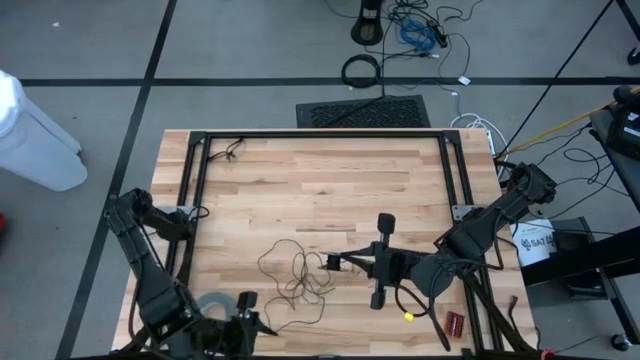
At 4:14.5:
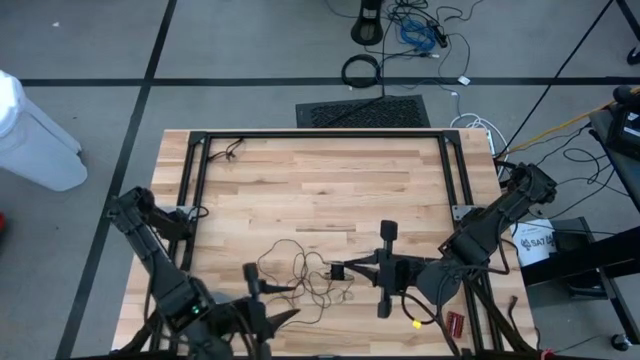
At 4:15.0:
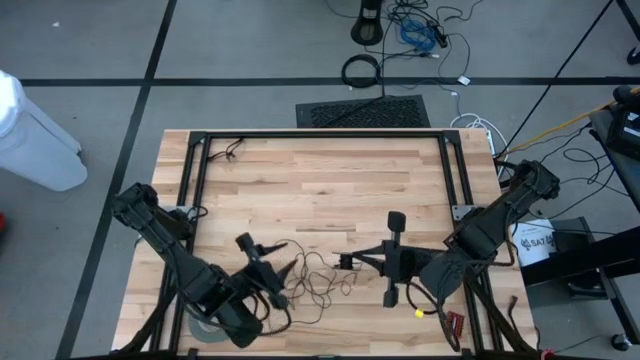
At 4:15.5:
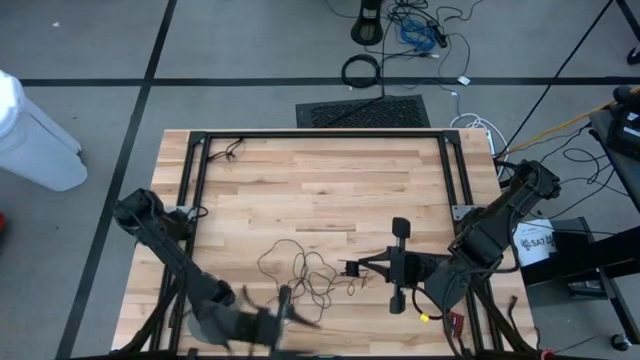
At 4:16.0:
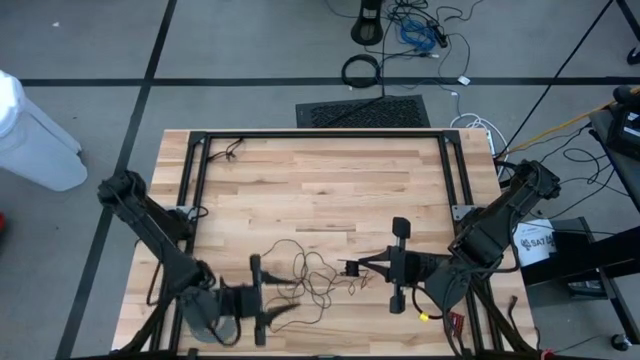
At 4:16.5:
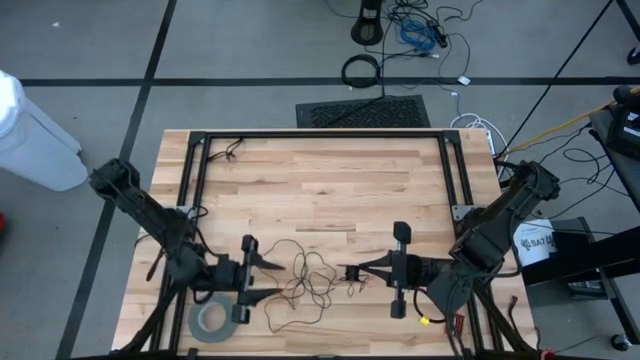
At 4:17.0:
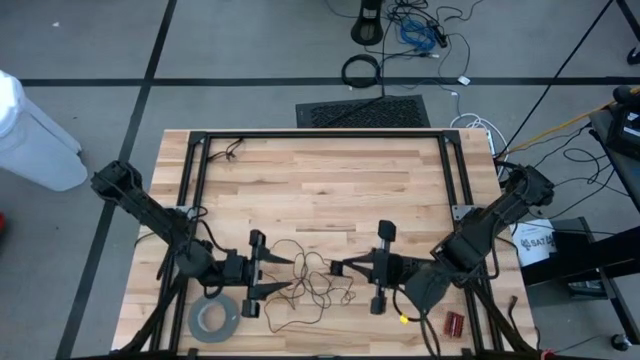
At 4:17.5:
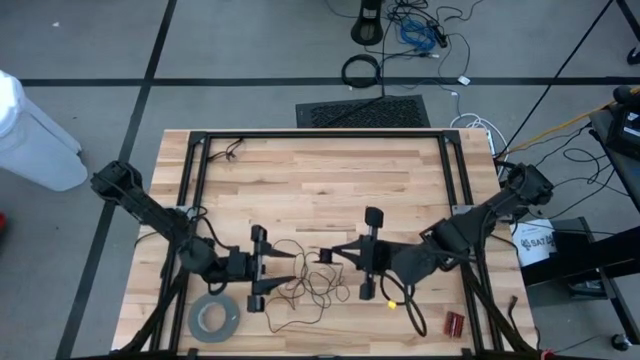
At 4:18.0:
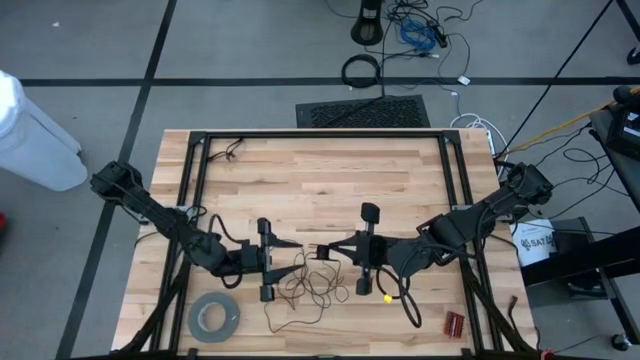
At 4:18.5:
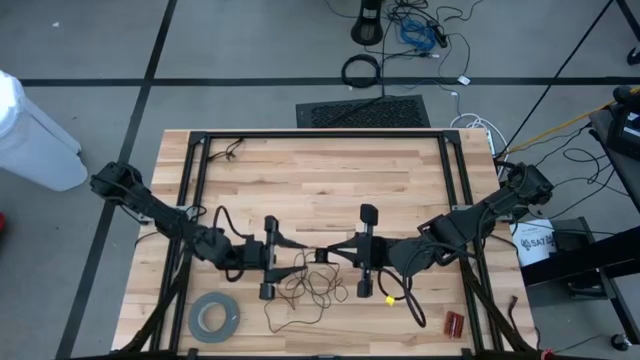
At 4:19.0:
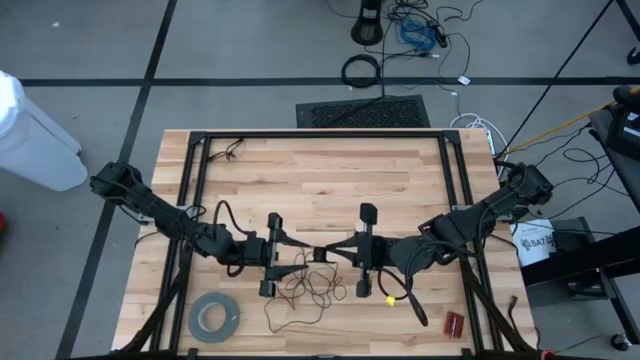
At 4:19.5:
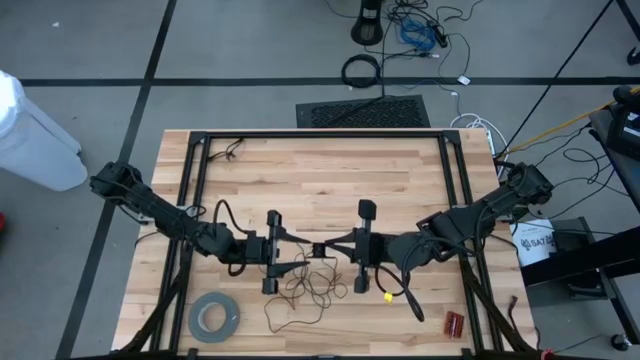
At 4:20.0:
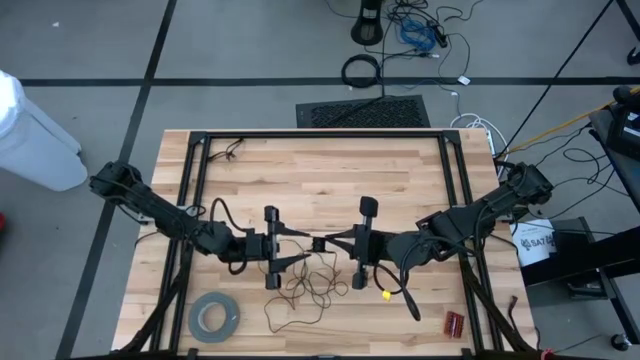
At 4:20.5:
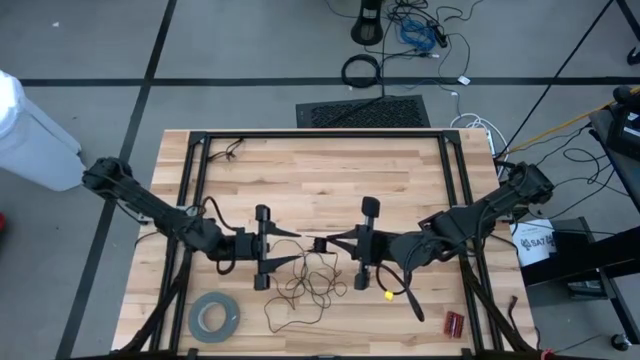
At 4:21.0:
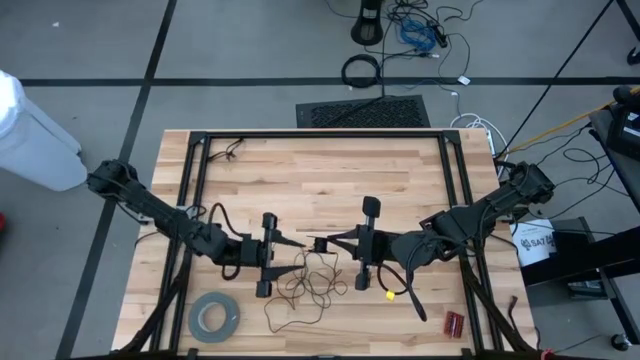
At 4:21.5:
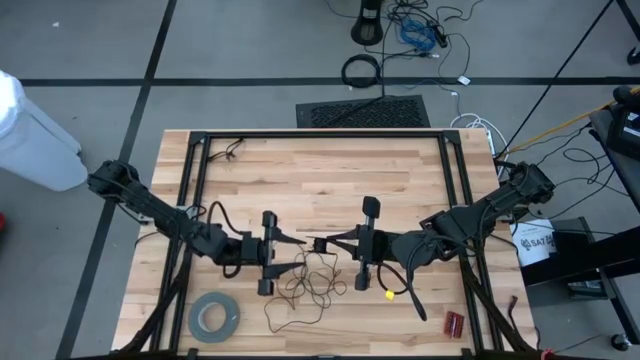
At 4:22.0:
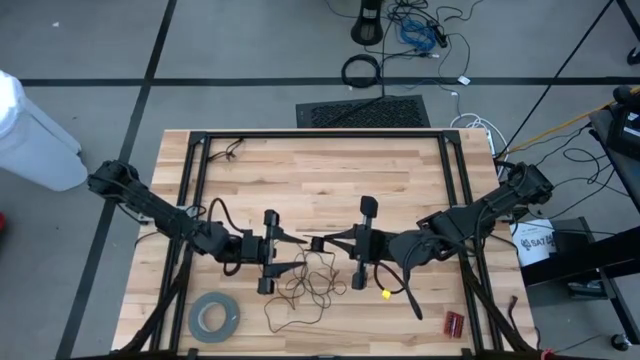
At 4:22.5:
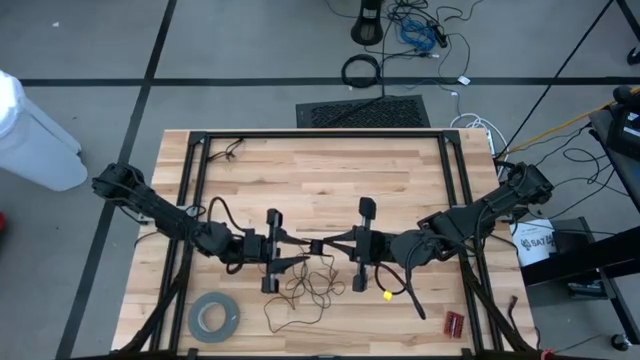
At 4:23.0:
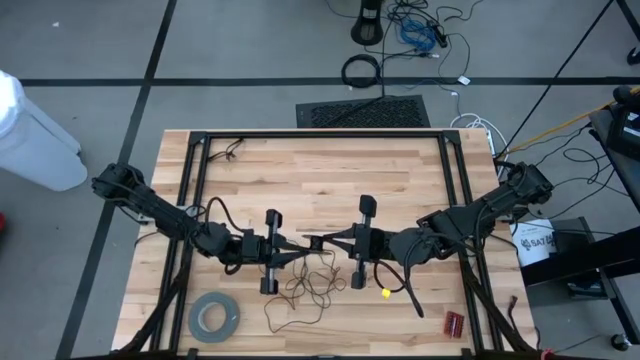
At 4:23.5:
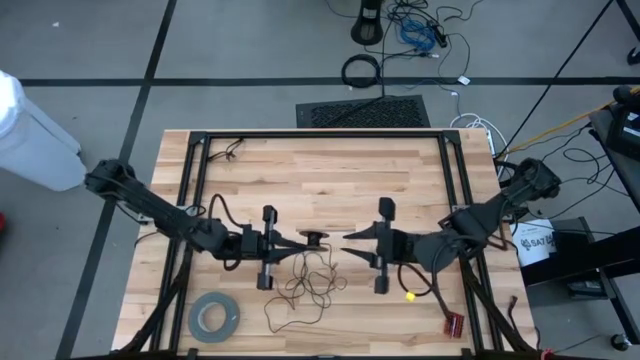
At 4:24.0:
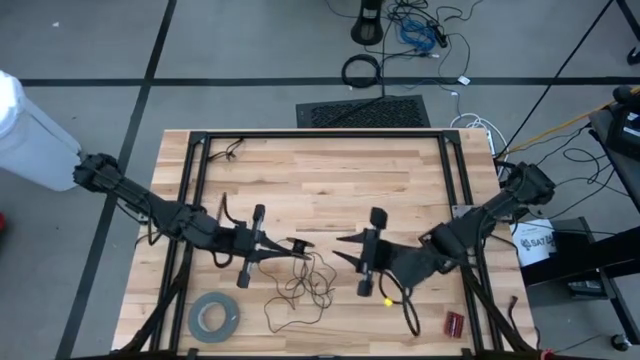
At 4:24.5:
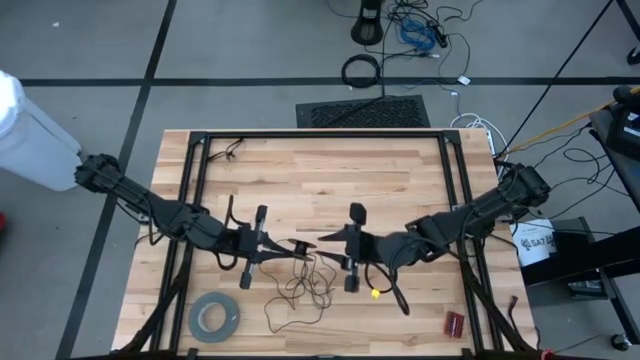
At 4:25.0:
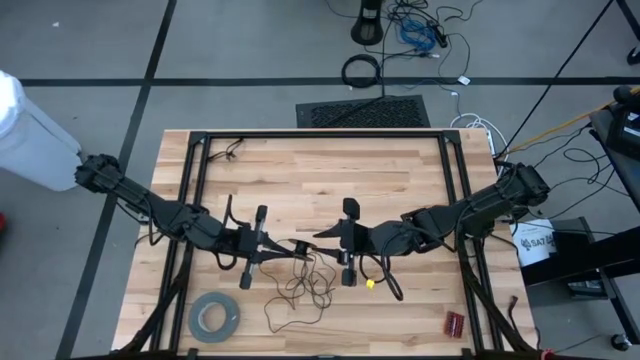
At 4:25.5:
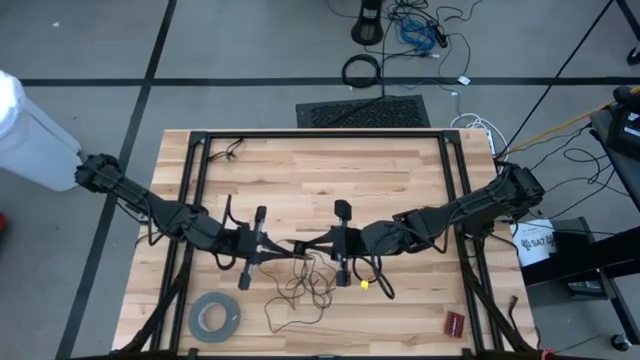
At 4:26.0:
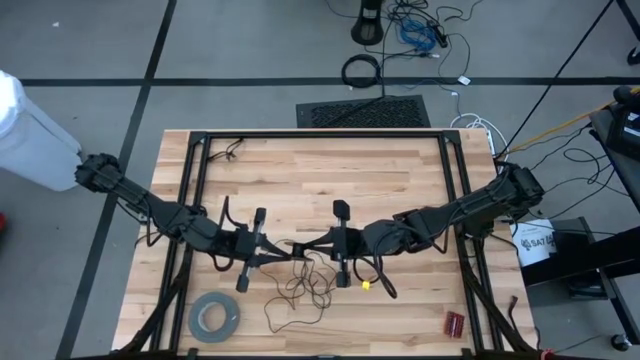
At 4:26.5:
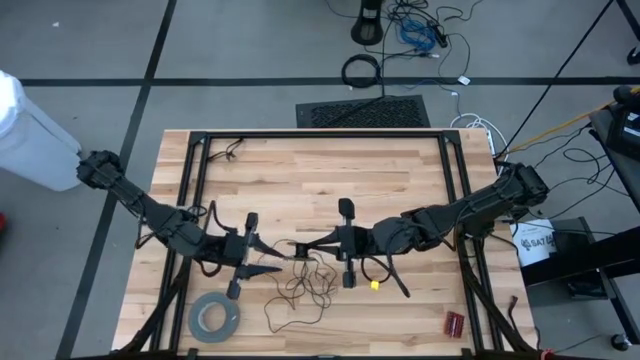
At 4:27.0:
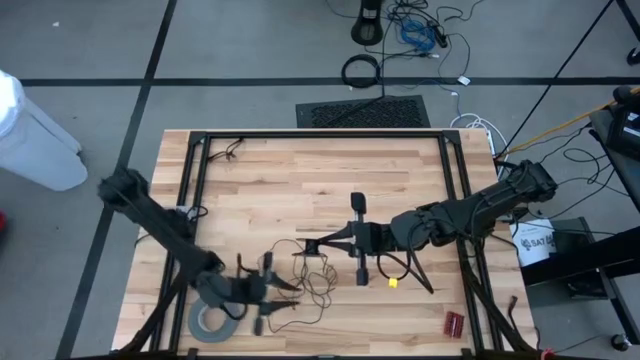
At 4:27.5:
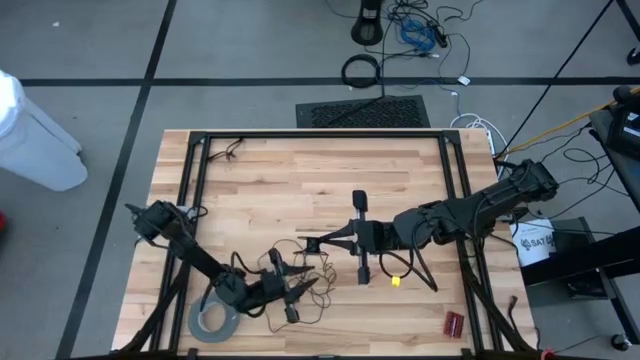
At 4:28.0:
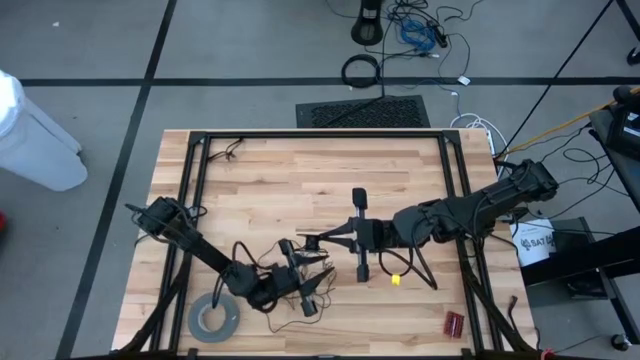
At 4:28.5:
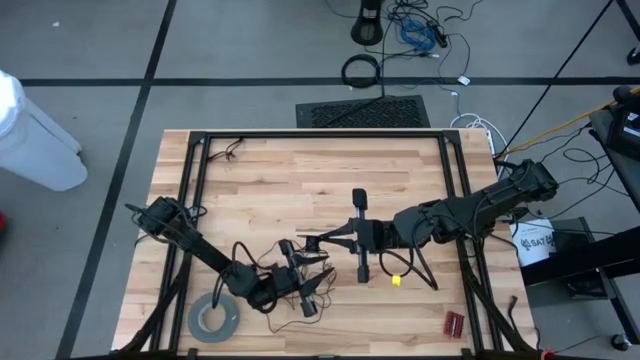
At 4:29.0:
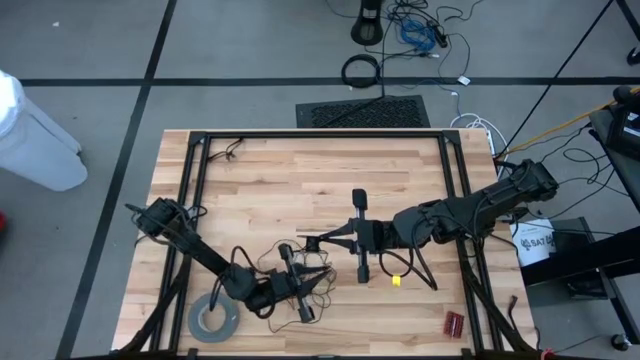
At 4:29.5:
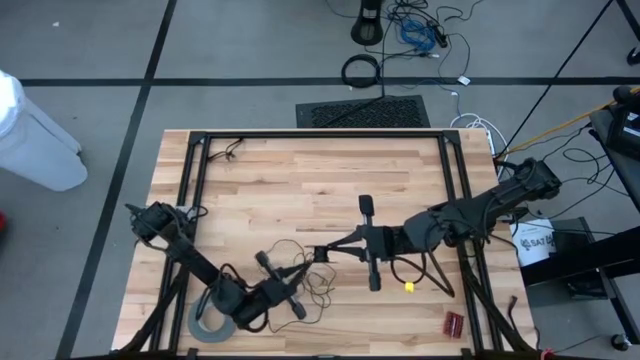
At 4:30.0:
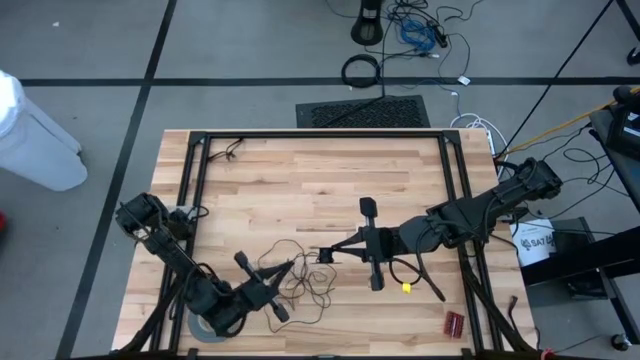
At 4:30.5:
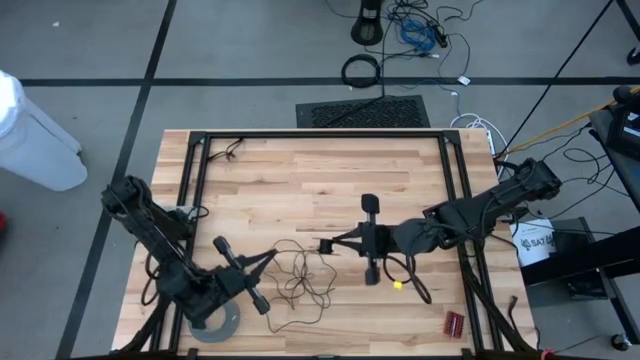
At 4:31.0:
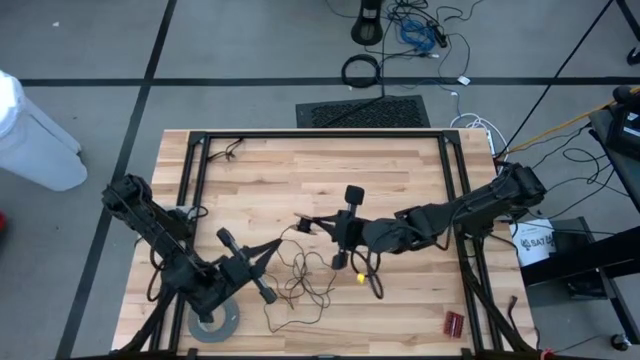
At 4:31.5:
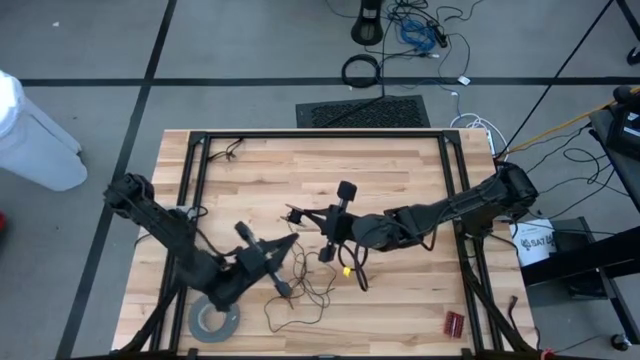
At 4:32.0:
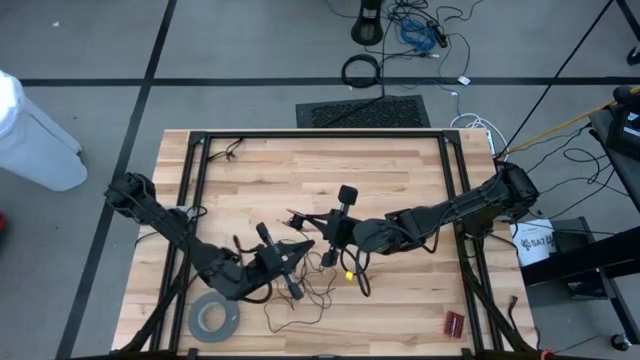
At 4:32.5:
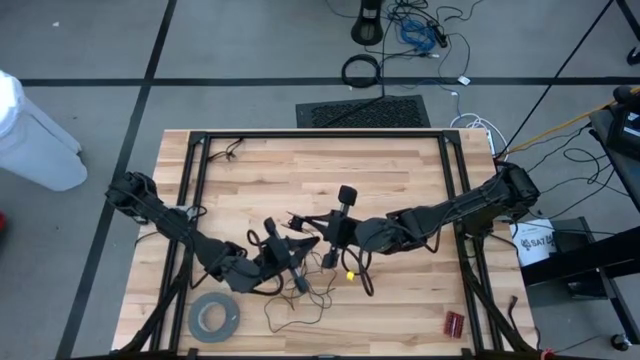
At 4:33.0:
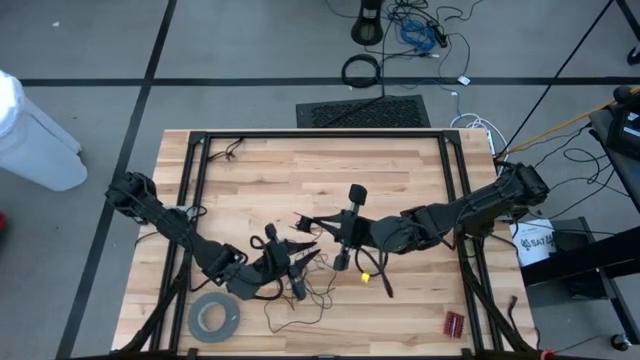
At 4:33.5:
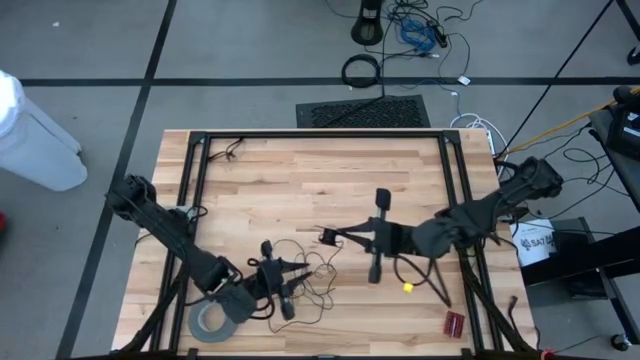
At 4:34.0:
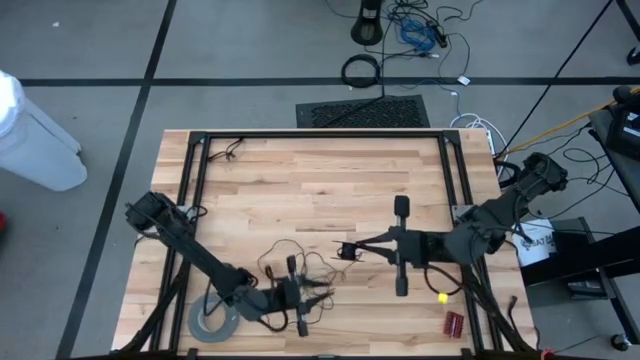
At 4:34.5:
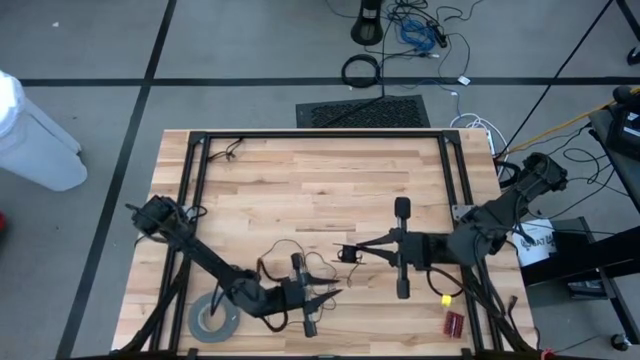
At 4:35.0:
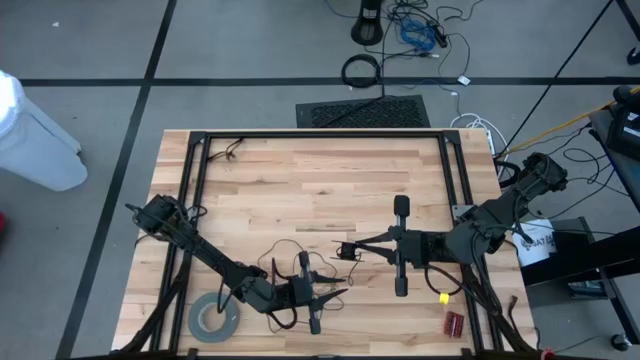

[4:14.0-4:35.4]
Task: Coil cords
Coil the black wire onto the spool
